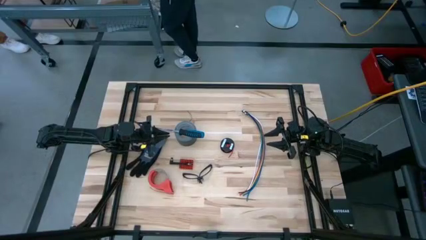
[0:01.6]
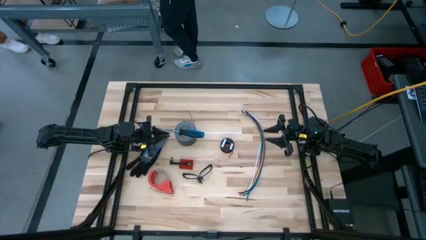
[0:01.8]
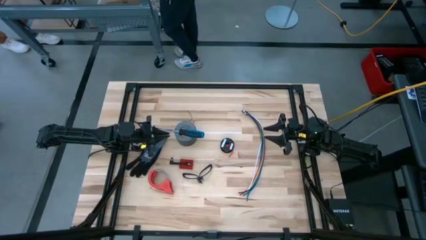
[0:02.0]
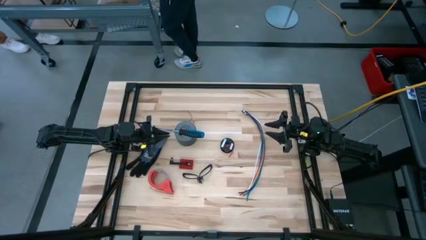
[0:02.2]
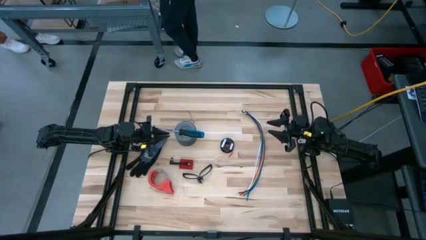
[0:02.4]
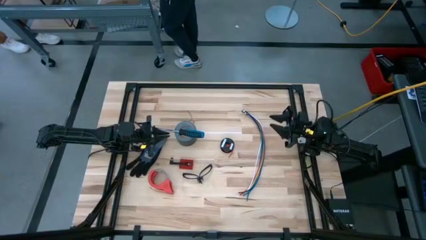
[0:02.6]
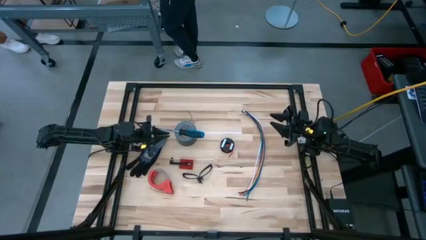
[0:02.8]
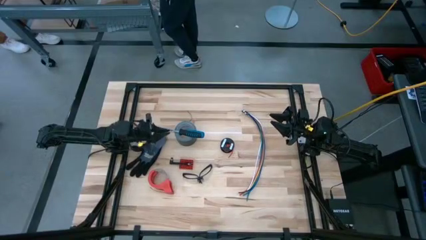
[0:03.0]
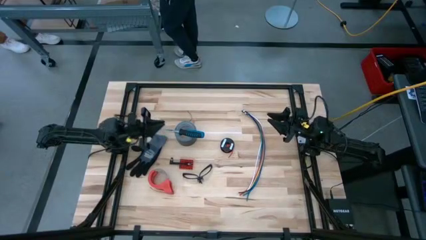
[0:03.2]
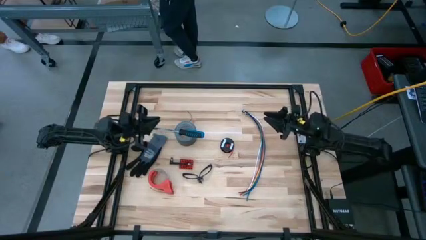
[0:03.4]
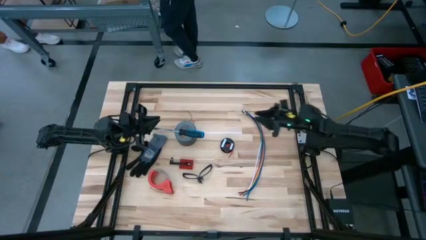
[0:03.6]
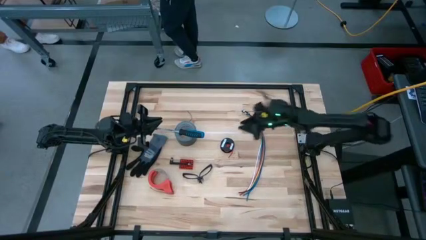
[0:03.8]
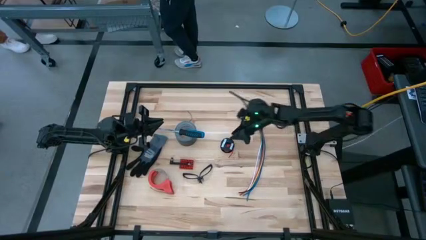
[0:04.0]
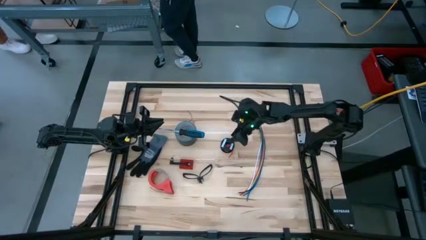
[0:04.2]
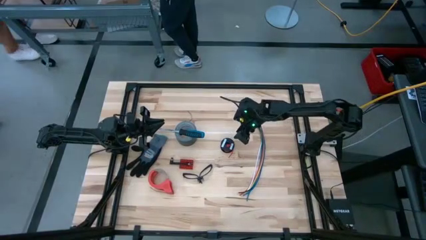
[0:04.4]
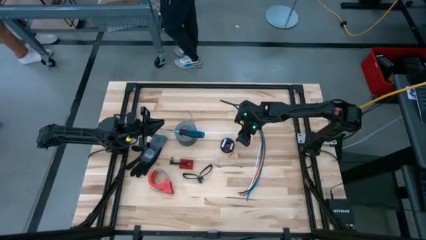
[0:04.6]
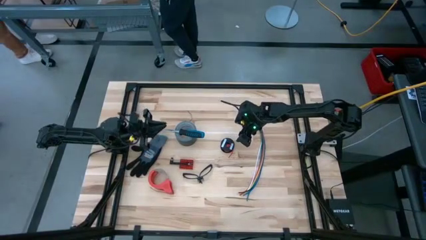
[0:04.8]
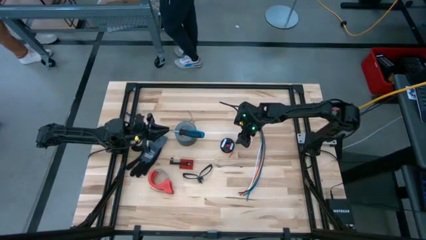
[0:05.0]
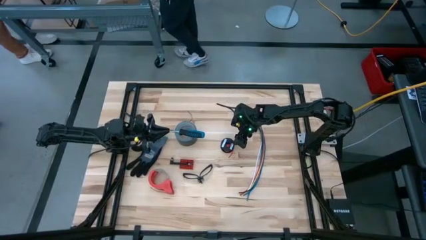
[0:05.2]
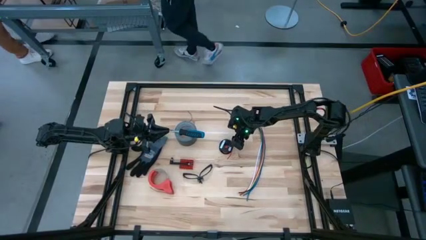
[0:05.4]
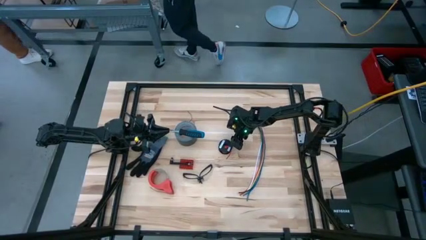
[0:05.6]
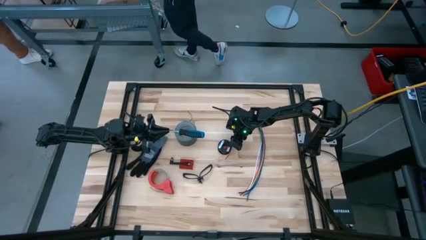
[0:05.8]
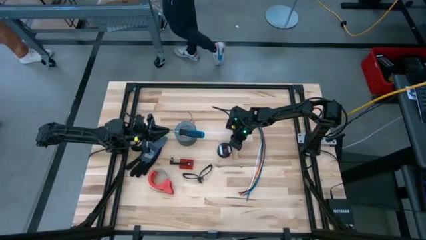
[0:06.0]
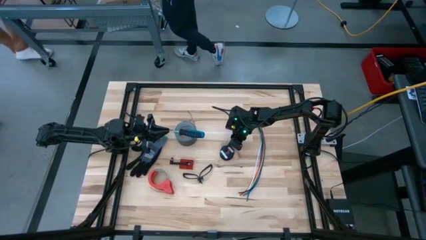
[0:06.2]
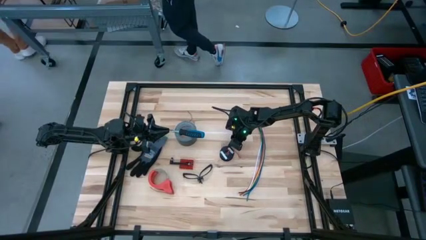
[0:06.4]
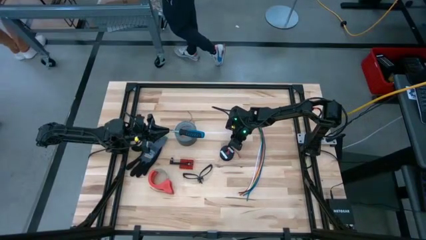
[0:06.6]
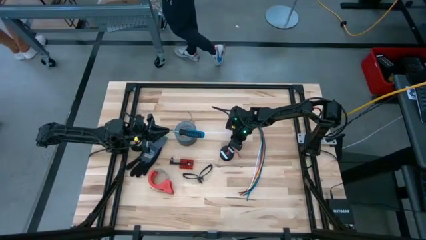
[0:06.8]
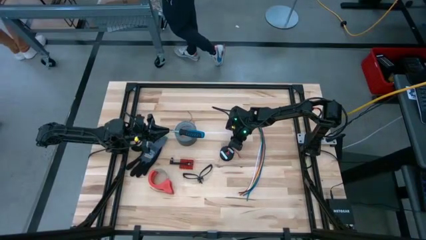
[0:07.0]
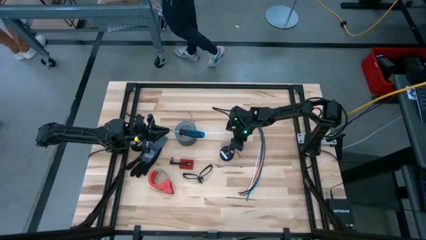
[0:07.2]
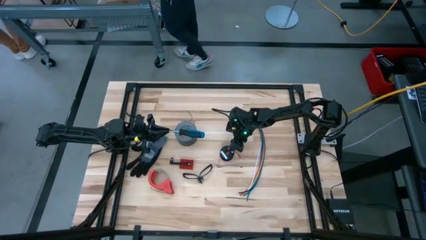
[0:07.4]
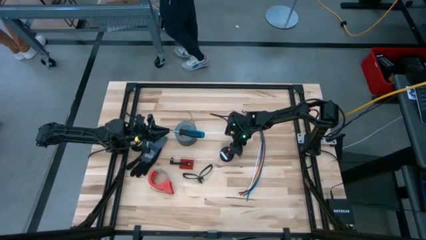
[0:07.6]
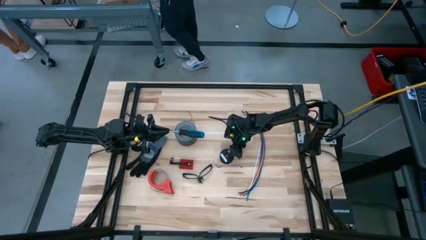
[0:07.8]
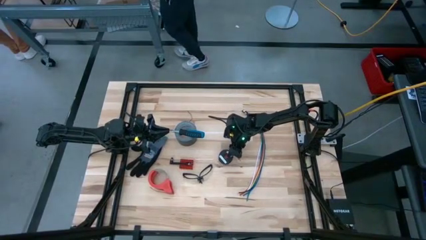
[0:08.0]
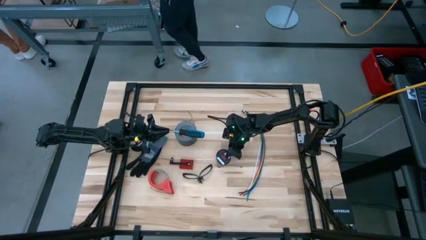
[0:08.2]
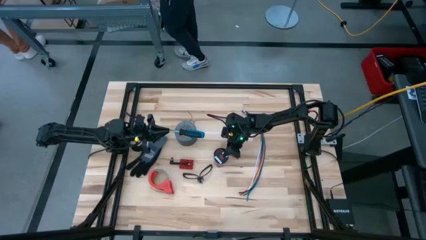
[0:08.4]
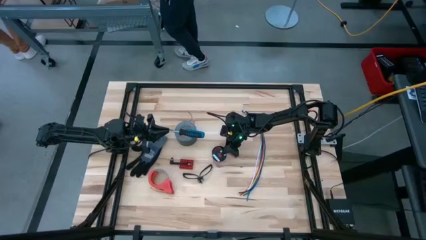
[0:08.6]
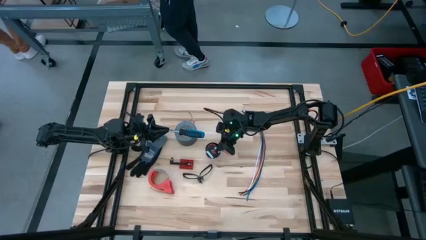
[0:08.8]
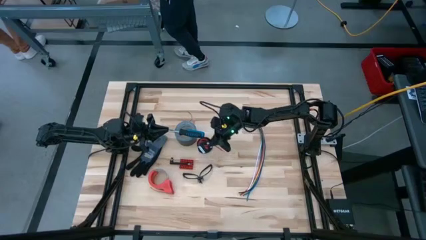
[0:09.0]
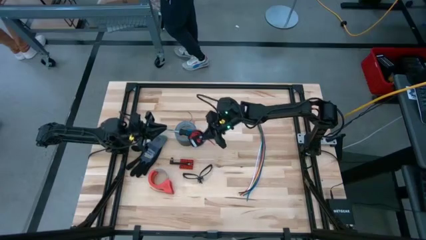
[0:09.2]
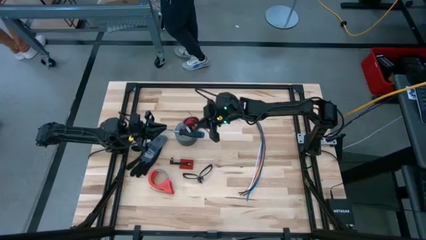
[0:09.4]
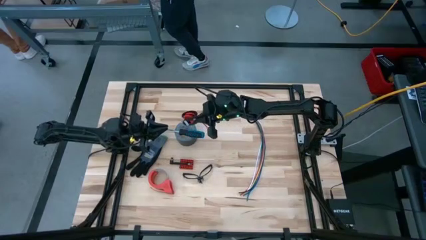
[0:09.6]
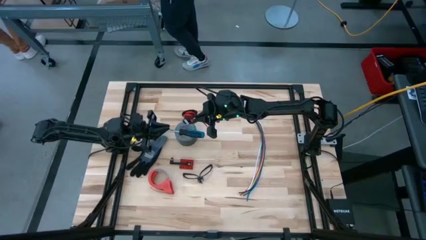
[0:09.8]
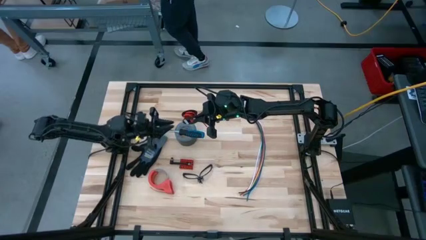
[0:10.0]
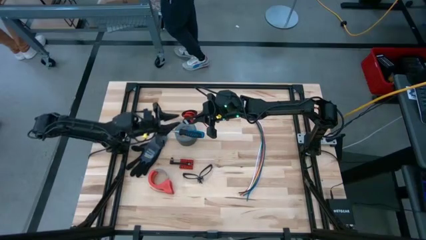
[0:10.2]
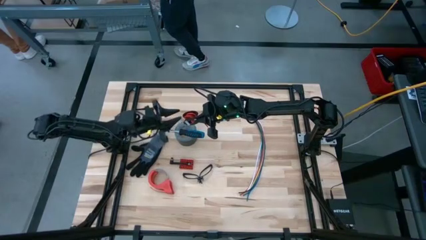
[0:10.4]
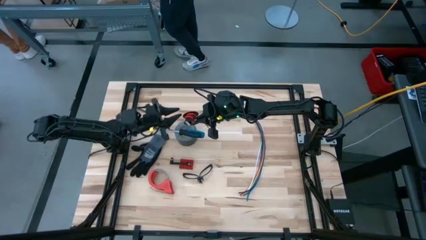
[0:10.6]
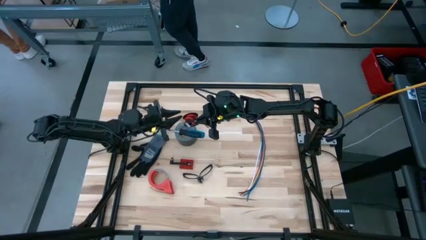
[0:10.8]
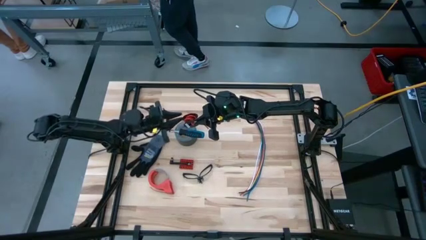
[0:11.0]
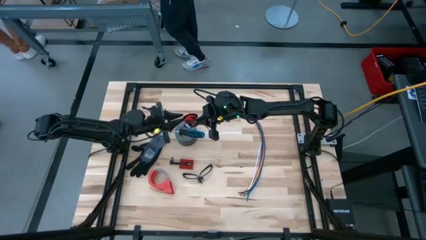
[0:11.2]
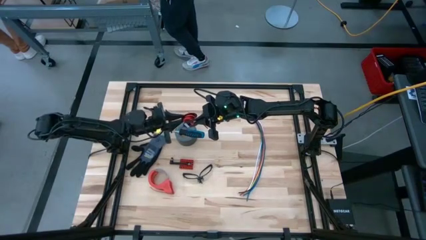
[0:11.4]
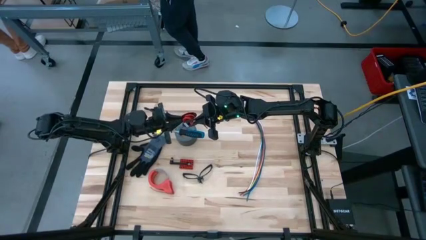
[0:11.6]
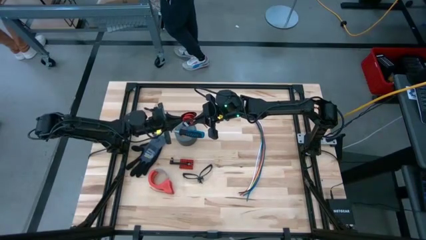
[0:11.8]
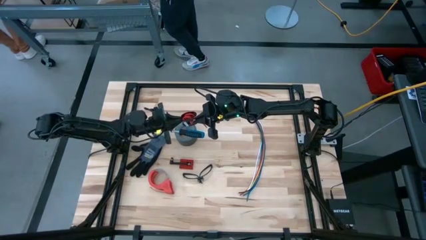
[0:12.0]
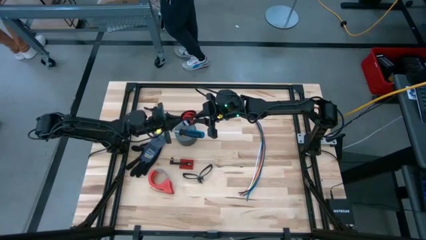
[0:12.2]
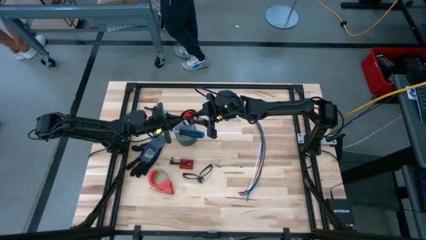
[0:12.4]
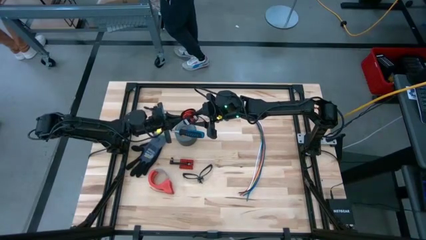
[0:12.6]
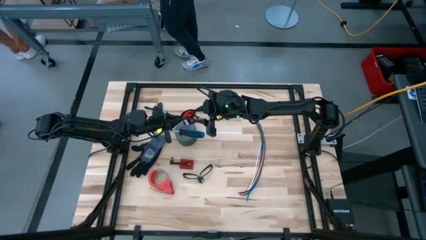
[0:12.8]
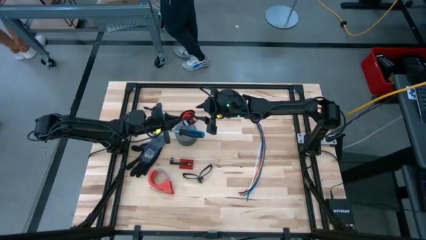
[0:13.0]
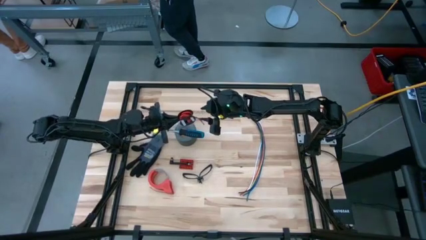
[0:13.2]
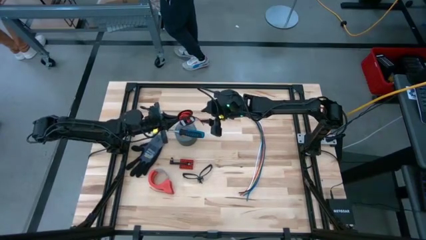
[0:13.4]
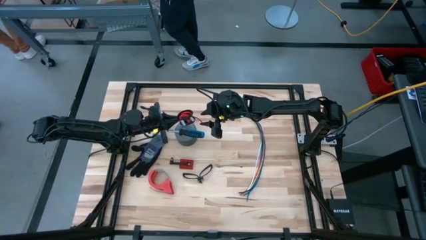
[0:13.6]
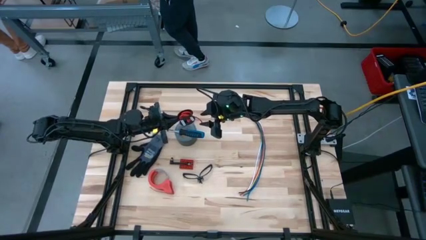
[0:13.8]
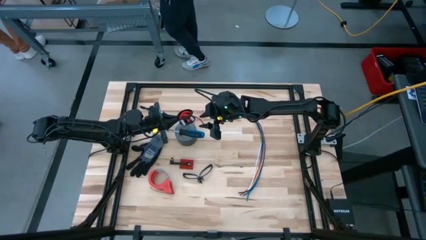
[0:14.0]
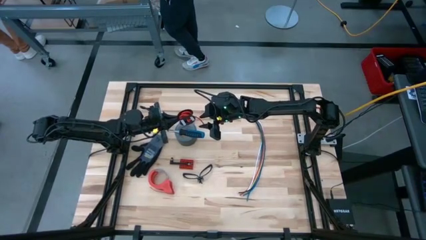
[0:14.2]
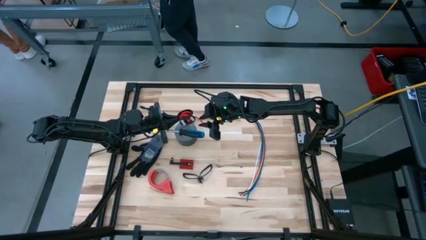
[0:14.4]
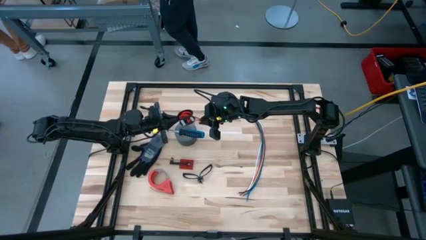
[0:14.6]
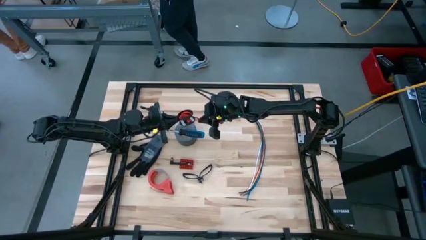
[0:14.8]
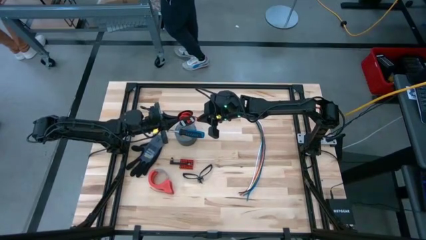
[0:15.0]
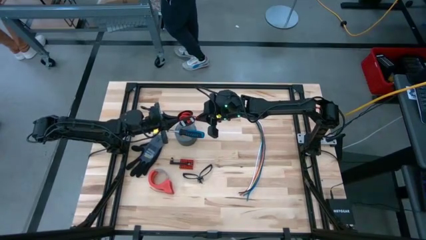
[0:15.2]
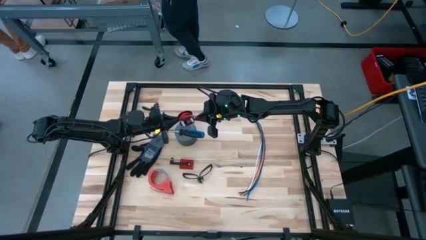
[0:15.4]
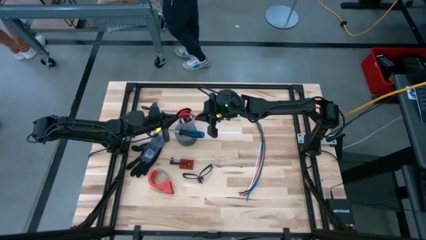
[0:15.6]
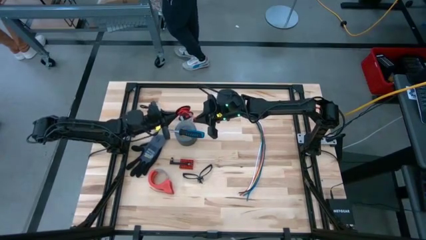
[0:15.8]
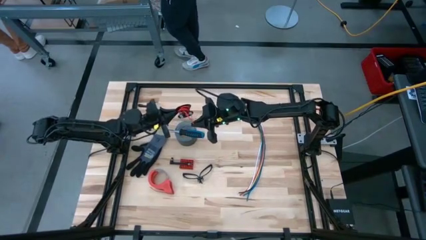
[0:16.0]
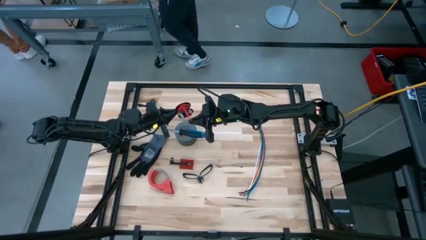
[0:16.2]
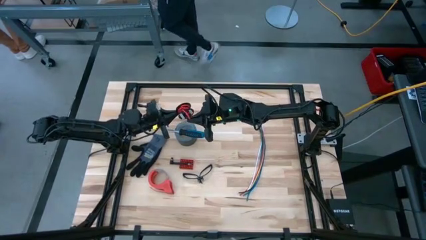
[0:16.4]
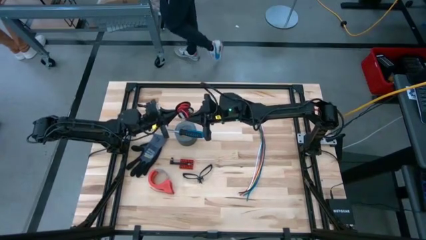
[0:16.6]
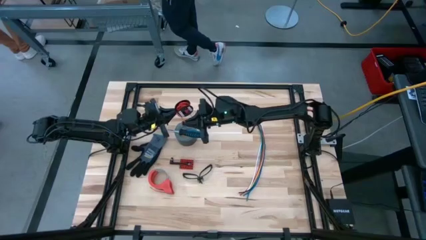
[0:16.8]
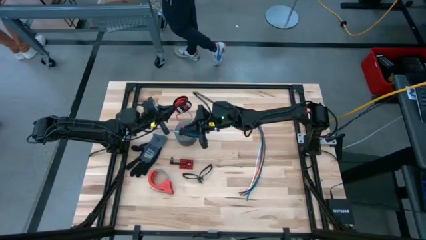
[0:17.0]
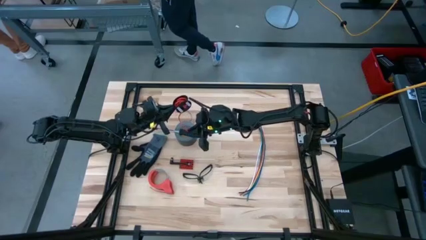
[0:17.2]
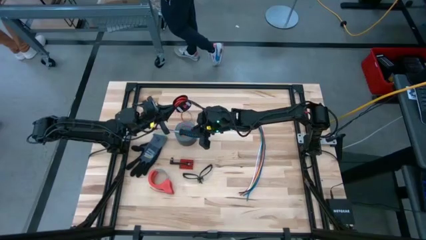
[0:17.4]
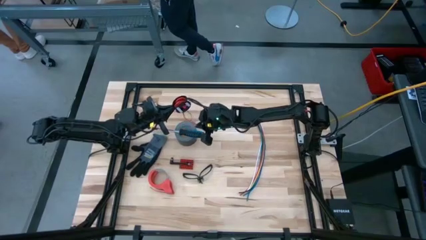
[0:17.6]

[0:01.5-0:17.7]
Task: Coil cords
Uncoil the red wire from the black spool
